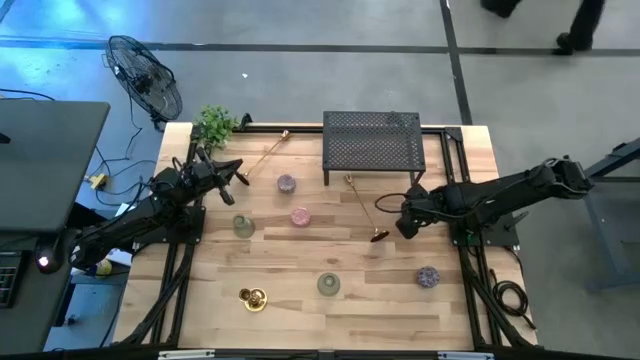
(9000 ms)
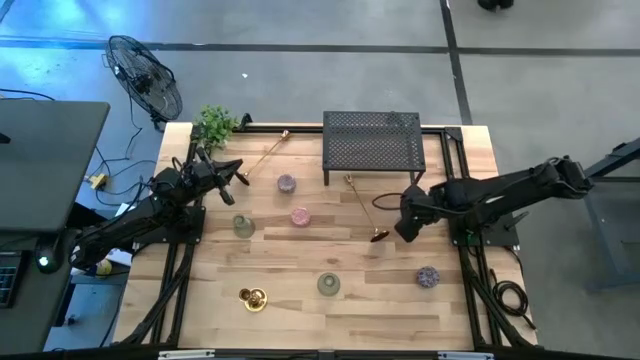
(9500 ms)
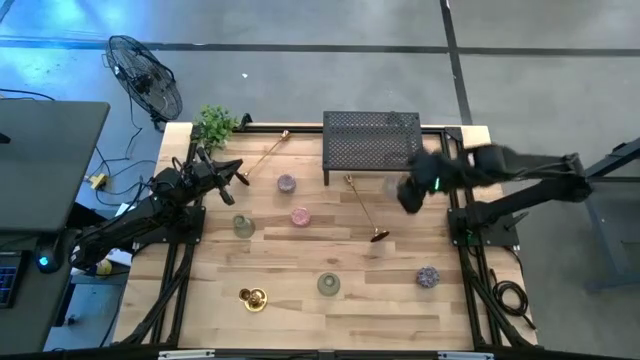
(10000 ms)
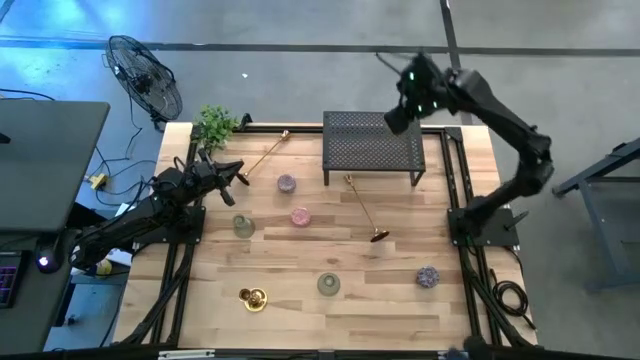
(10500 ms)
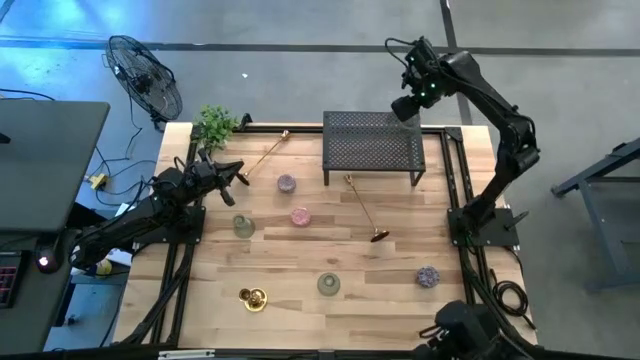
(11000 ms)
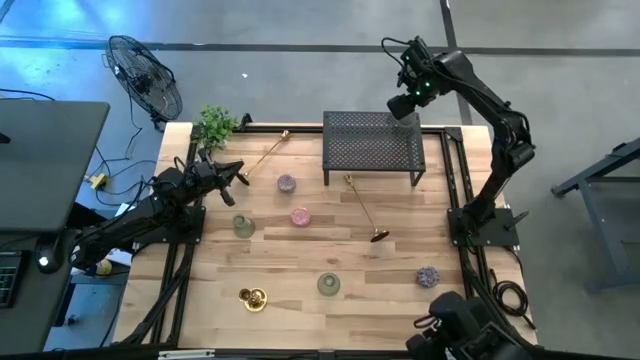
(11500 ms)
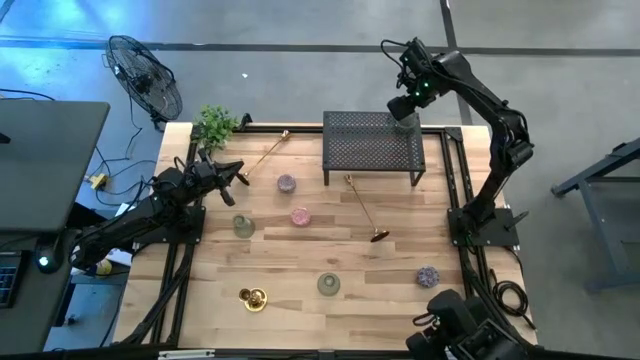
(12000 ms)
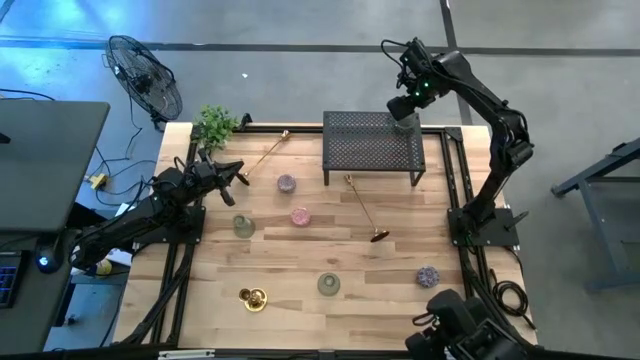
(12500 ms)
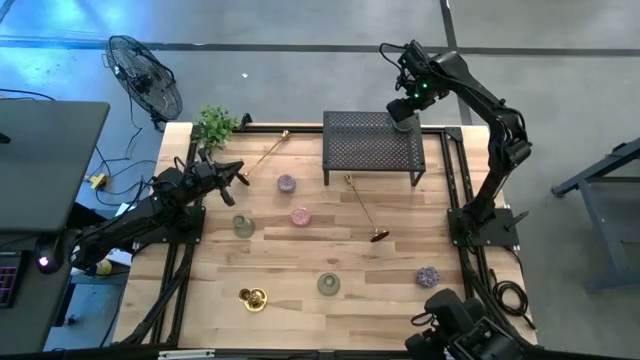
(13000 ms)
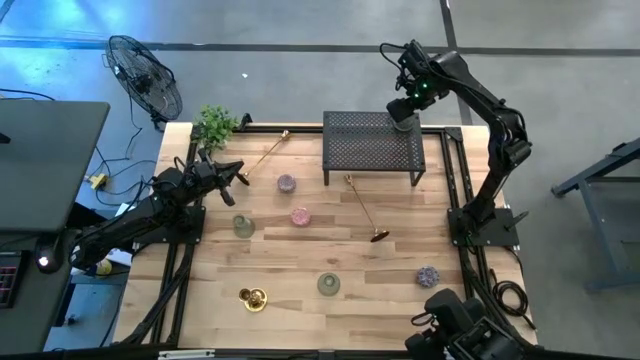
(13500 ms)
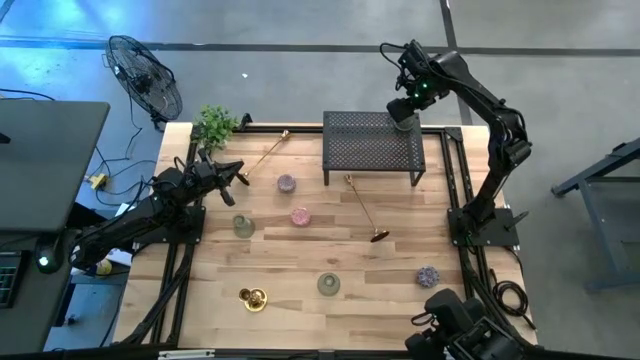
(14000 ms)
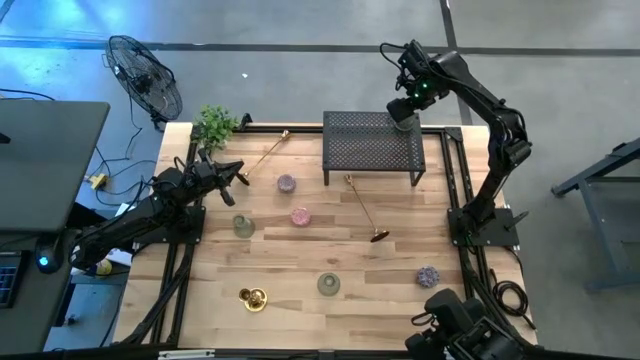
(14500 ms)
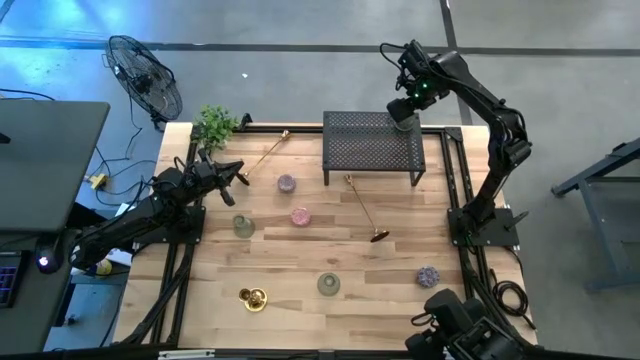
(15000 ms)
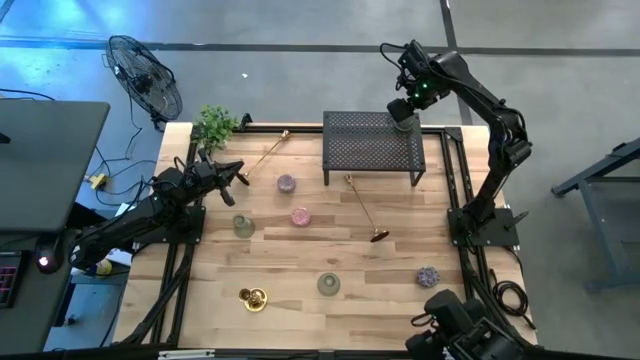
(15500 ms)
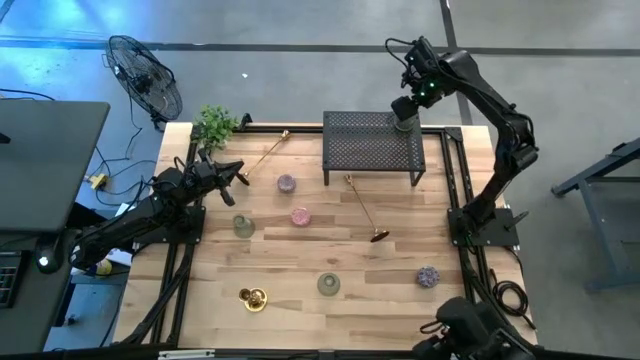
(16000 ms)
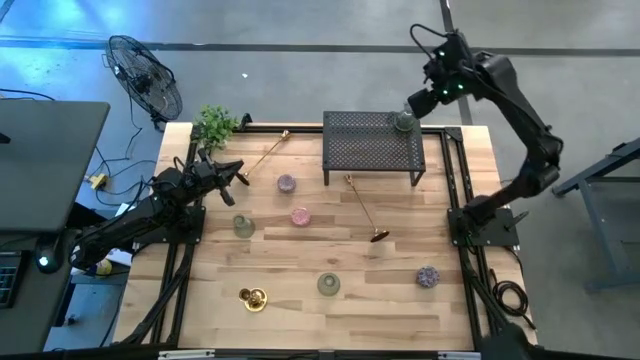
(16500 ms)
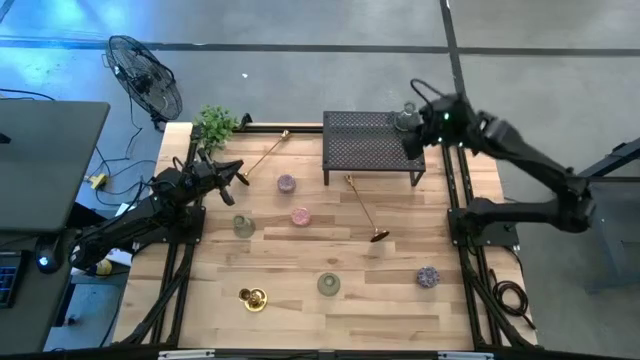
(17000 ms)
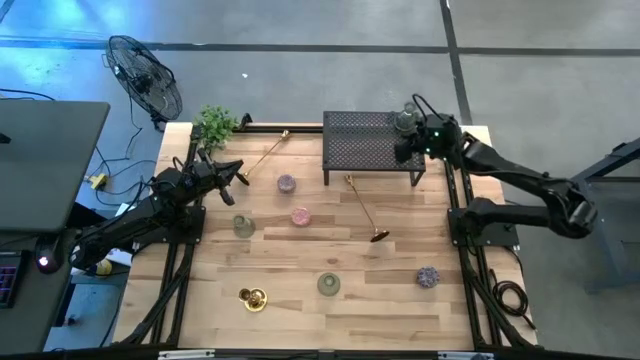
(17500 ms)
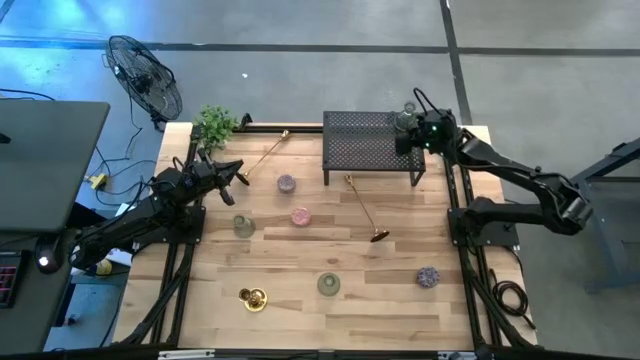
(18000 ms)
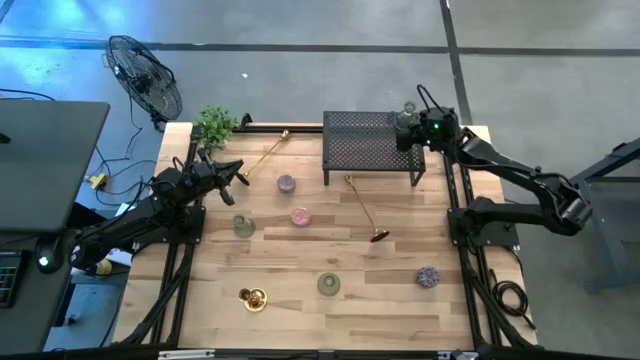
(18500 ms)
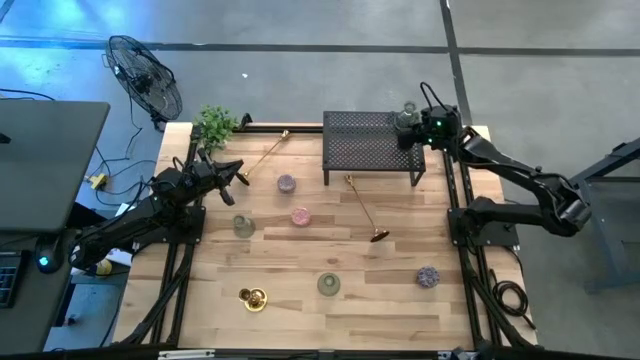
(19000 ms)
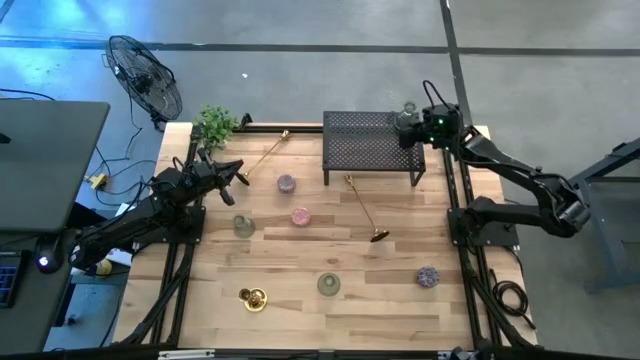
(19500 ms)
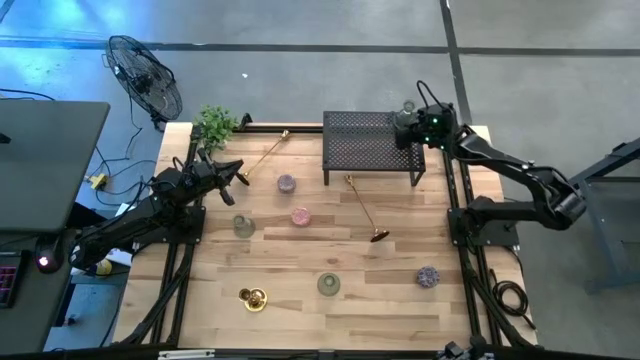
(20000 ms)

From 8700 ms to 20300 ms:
Task: Pick & Place candle stick holders
Put the top right transparent candle holder on the shelf

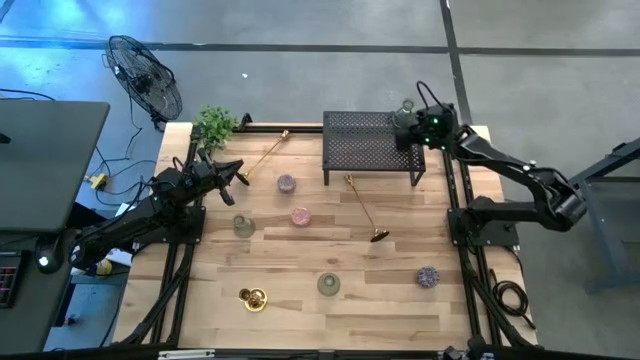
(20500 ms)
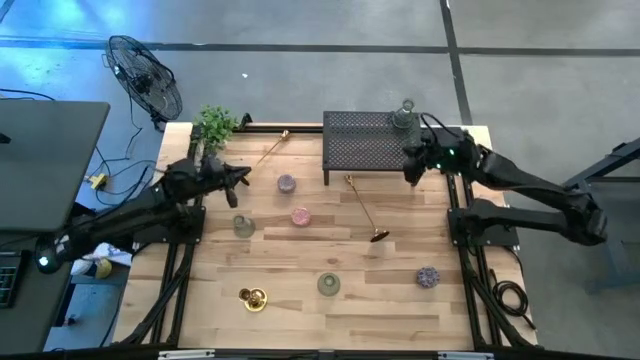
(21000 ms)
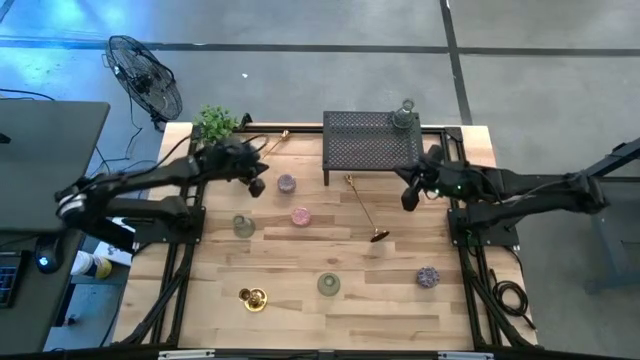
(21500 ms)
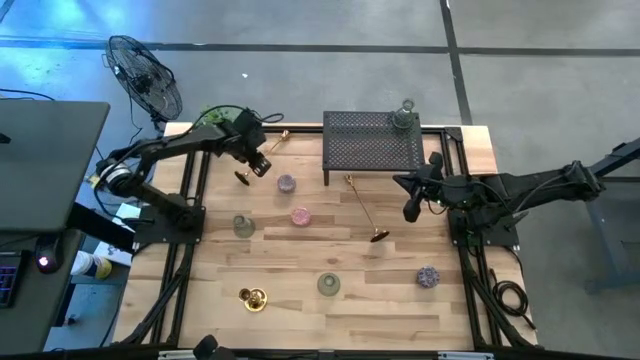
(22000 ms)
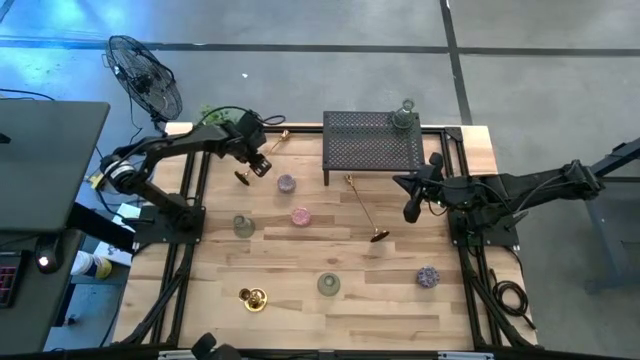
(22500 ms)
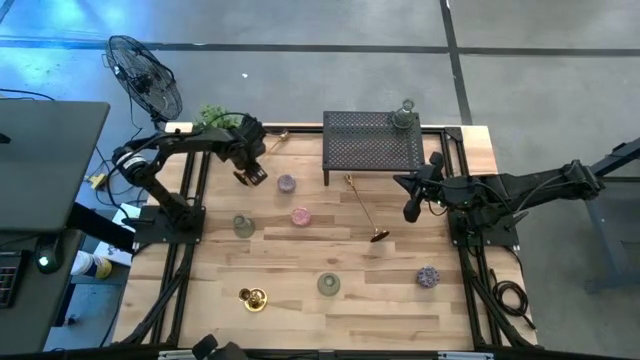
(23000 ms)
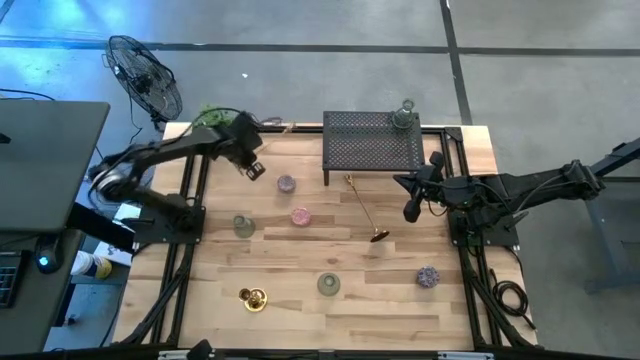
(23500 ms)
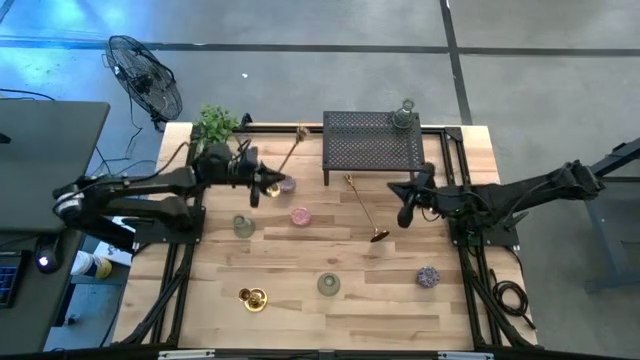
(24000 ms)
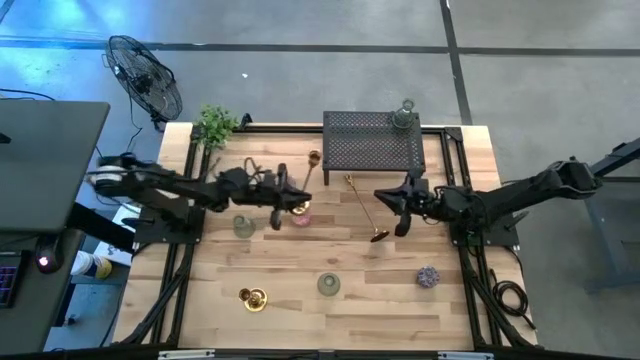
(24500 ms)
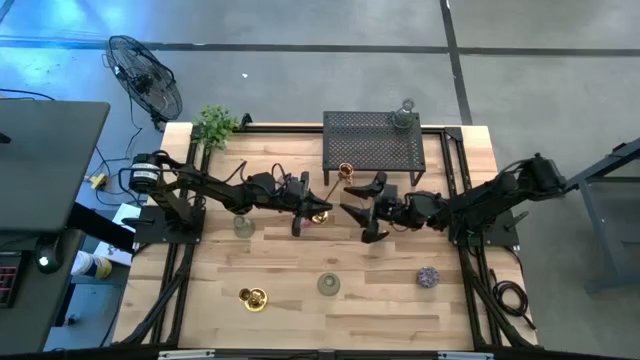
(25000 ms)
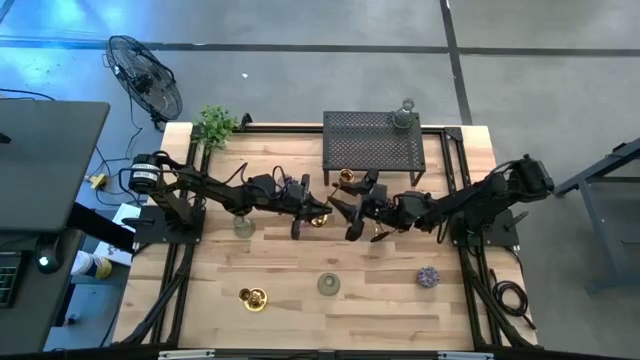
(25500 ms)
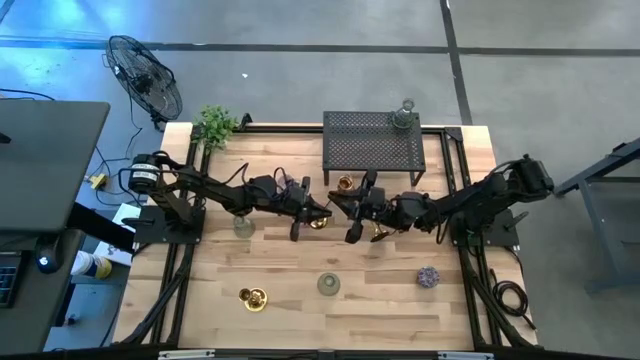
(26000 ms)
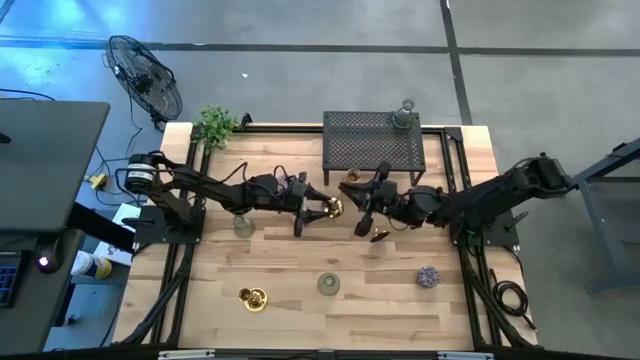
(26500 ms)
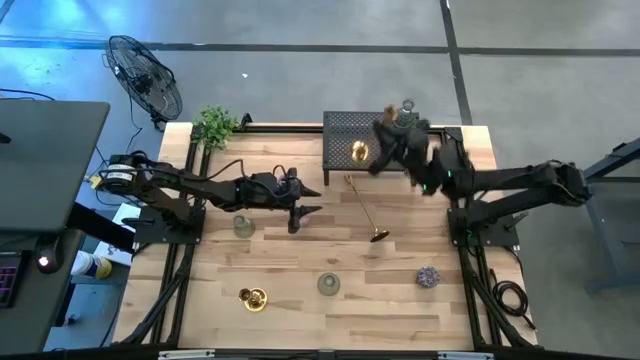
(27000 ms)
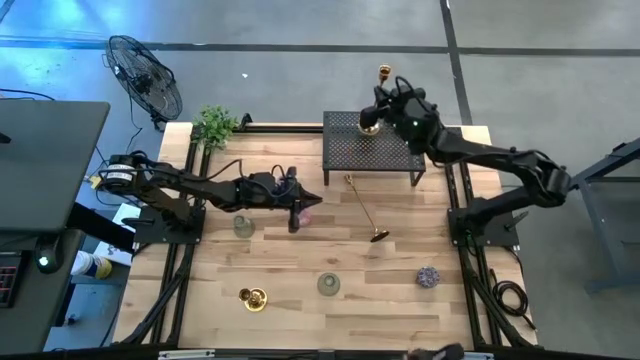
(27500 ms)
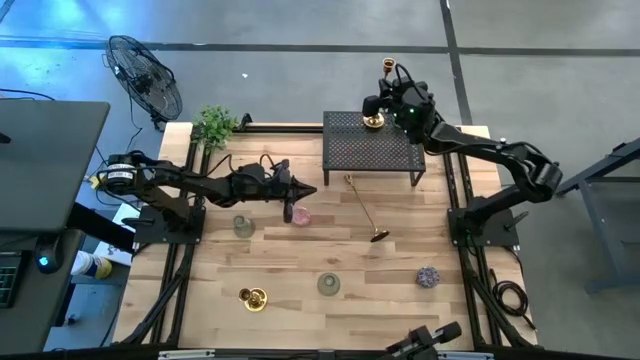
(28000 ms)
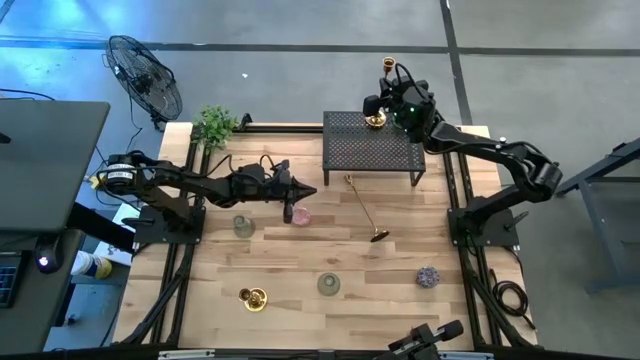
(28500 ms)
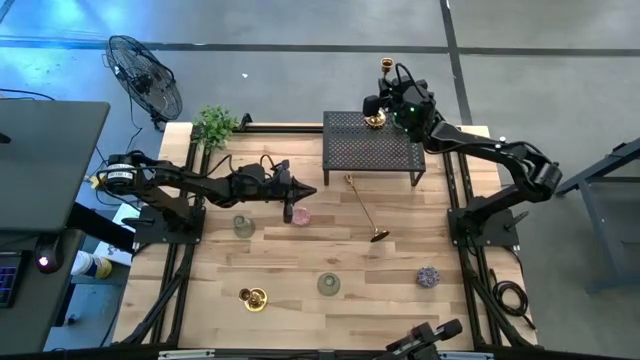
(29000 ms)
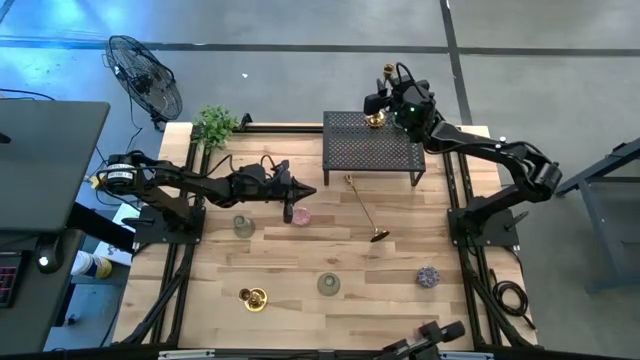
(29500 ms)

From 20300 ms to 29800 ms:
Put the top gold candle holder on the shelf
